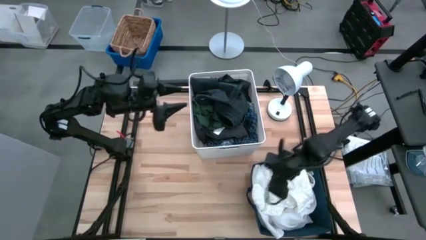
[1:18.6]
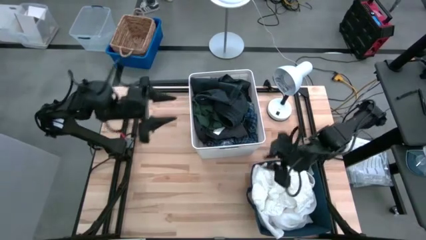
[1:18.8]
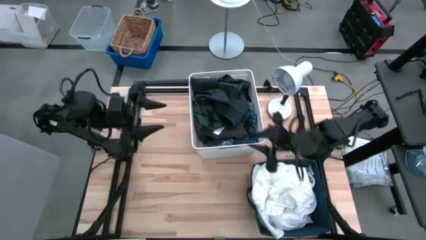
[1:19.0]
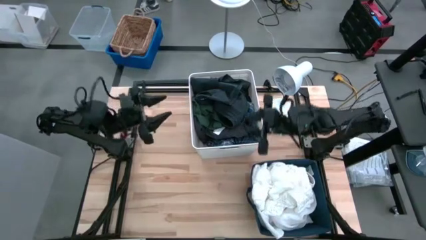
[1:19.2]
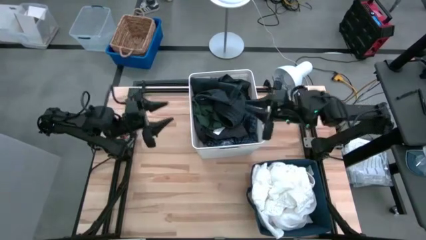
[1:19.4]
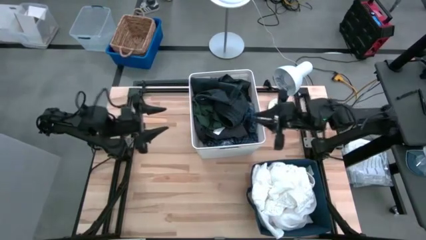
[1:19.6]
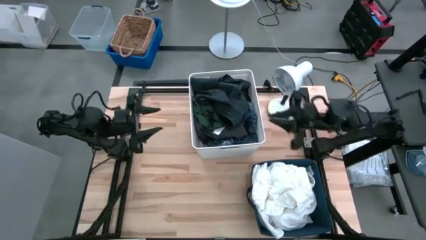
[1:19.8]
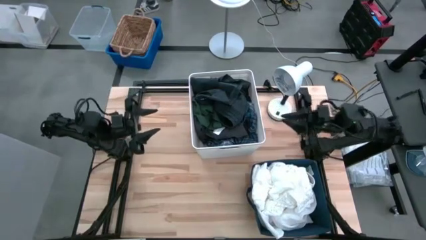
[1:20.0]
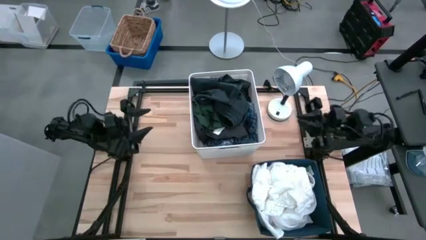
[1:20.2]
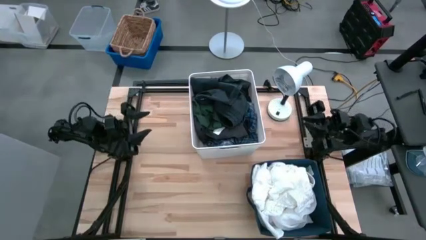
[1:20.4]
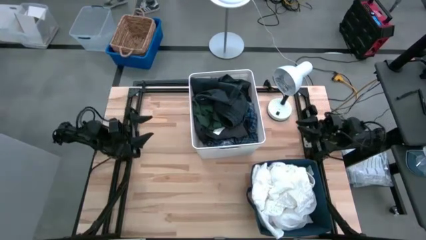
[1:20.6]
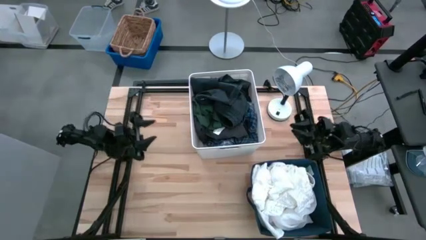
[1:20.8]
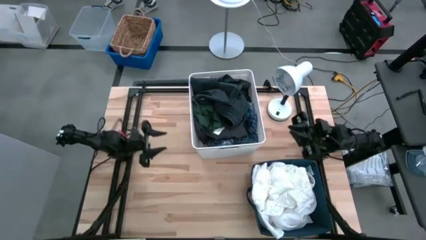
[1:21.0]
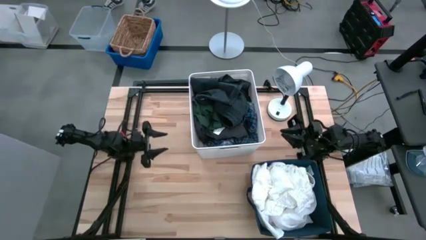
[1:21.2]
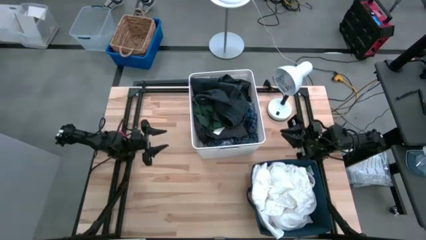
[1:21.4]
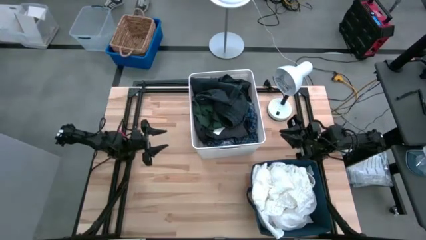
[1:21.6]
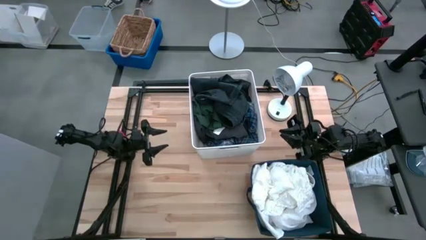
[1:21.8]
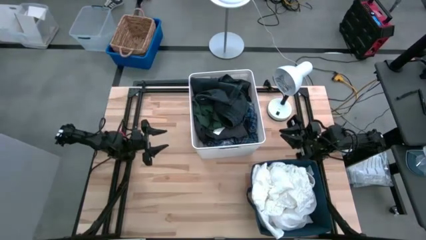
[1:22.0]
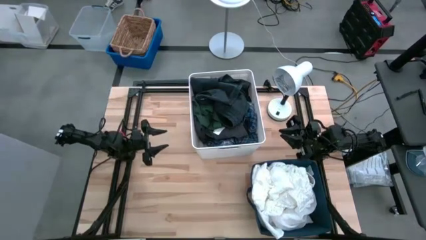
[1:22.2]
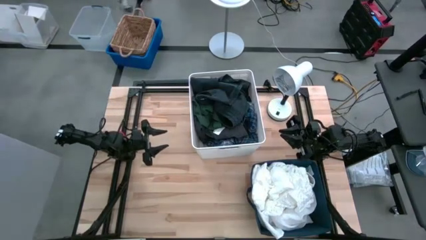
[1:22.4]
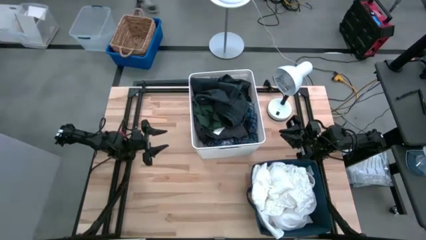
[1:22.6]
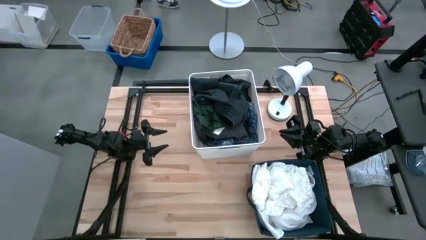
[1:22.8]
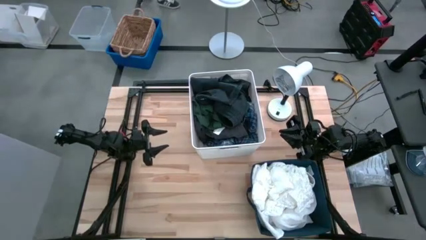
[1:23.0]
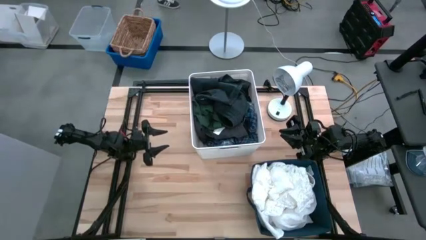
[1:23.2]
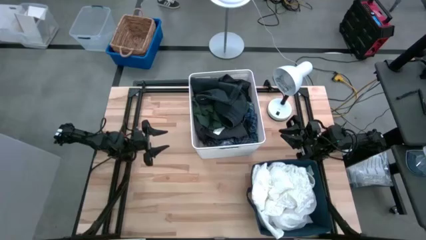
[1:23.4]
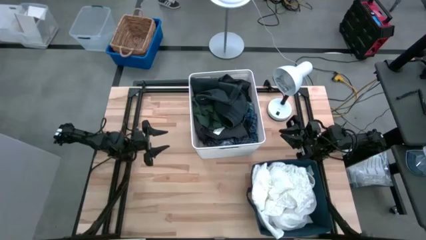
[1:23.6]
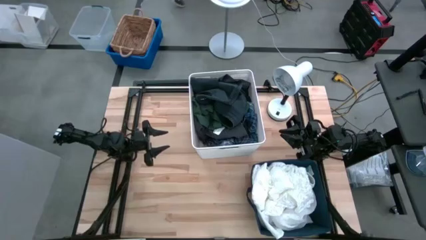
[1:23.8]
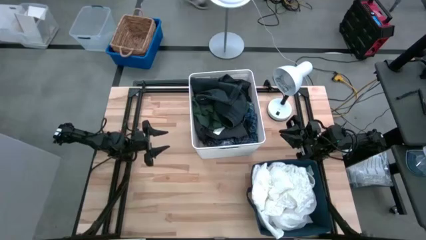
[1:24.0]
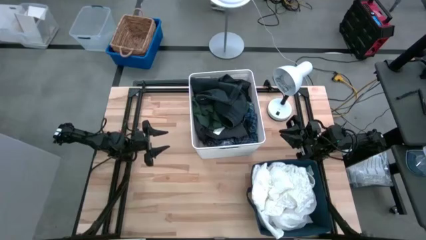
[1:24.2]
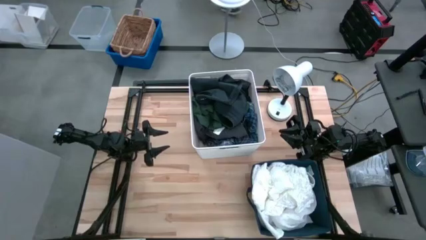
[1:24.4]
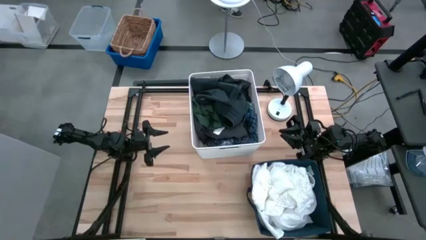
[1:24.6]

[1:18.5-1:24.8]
Task: Sort clothes
Return to Home Position

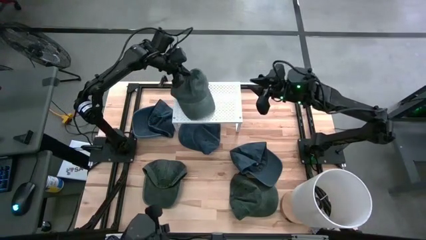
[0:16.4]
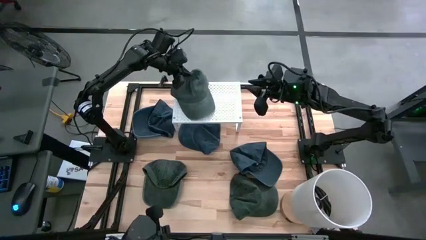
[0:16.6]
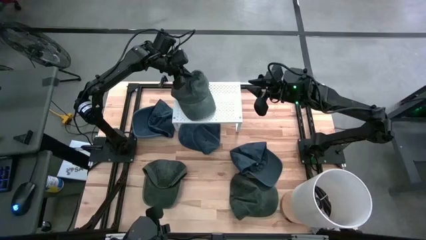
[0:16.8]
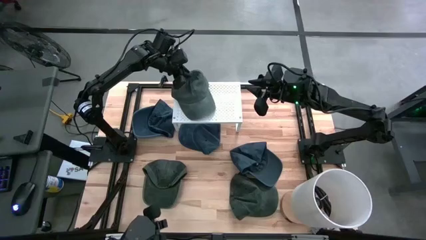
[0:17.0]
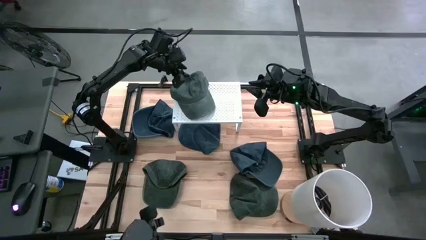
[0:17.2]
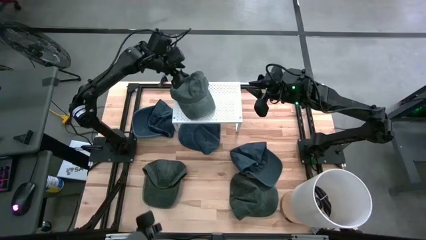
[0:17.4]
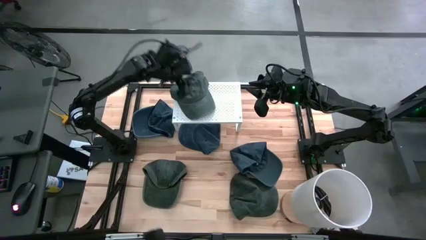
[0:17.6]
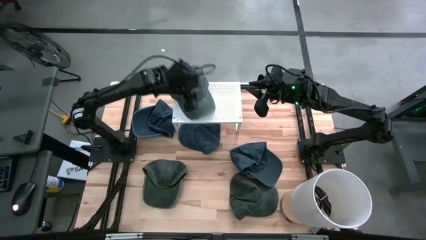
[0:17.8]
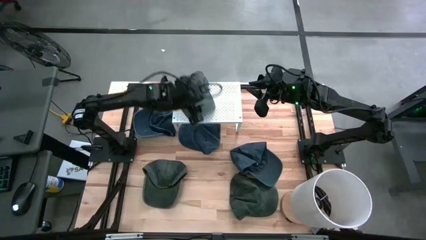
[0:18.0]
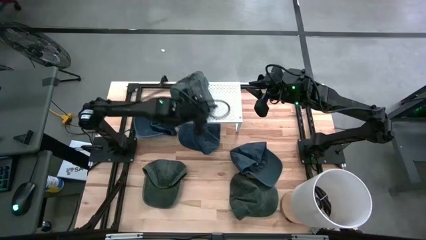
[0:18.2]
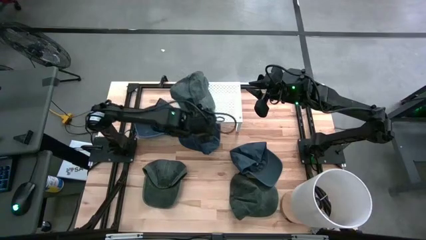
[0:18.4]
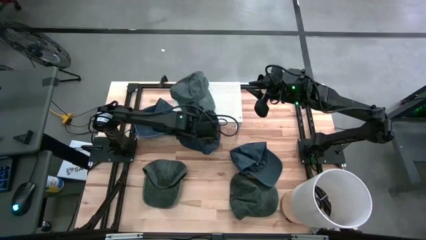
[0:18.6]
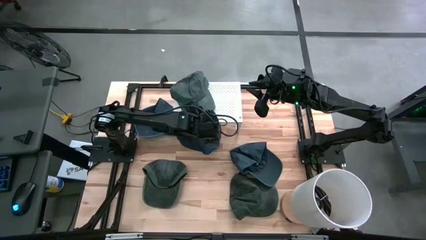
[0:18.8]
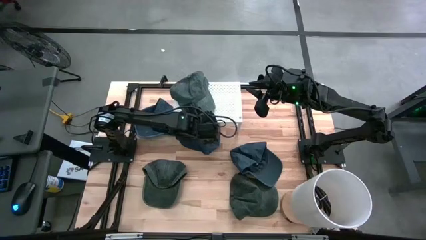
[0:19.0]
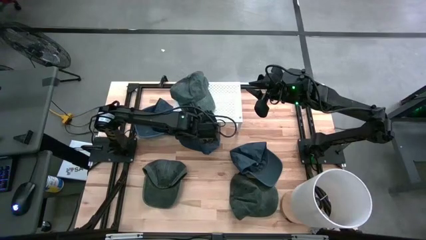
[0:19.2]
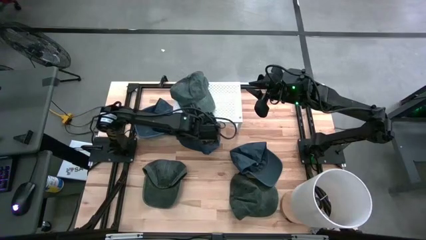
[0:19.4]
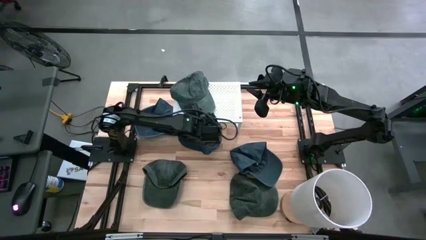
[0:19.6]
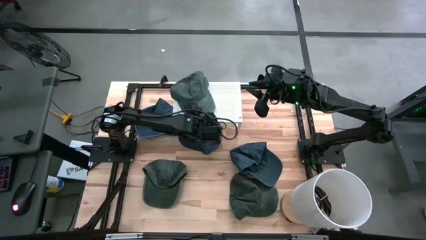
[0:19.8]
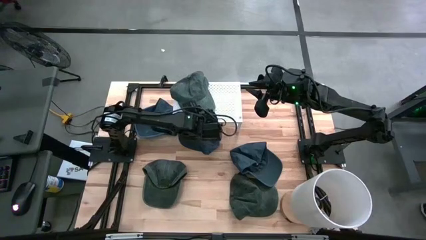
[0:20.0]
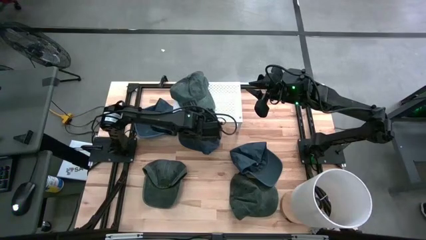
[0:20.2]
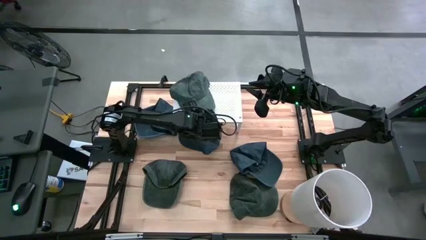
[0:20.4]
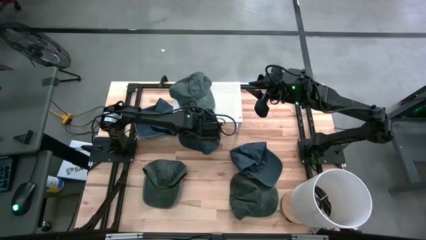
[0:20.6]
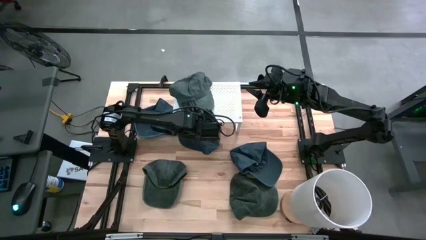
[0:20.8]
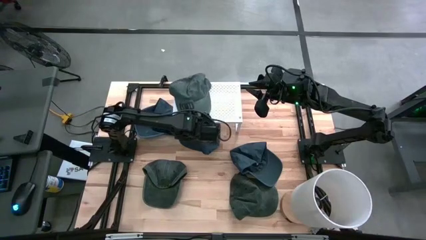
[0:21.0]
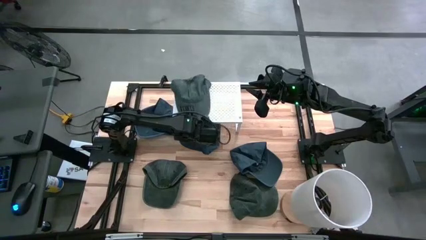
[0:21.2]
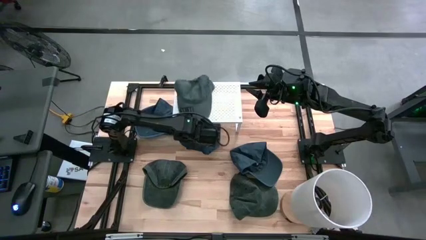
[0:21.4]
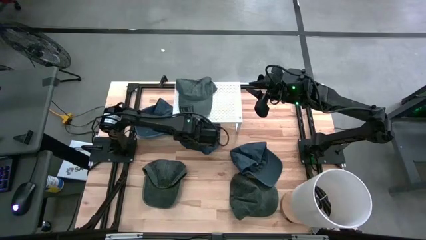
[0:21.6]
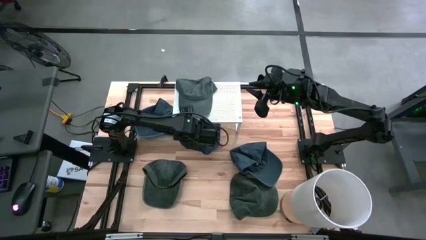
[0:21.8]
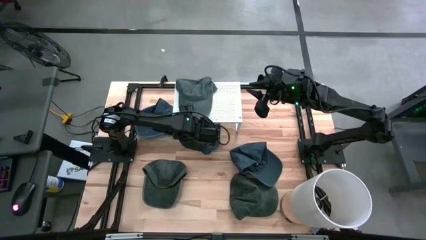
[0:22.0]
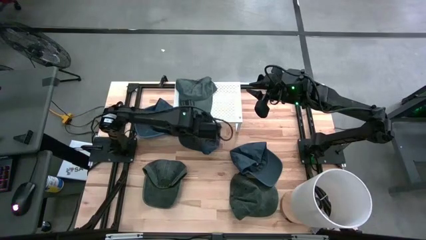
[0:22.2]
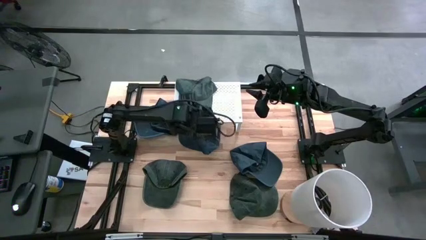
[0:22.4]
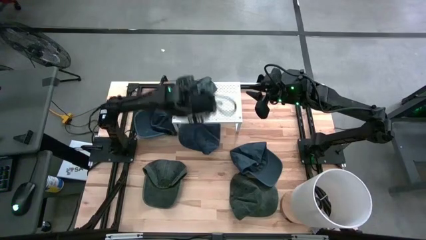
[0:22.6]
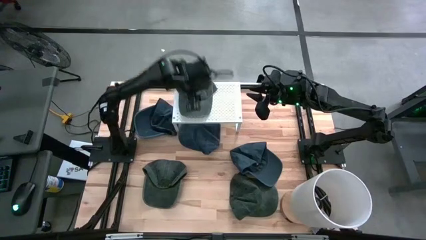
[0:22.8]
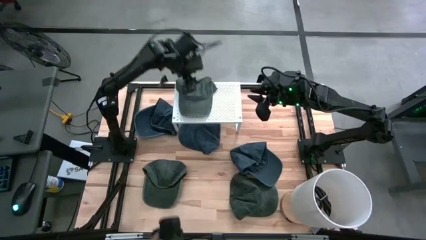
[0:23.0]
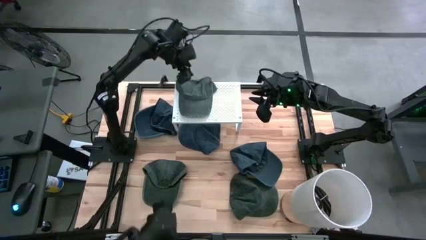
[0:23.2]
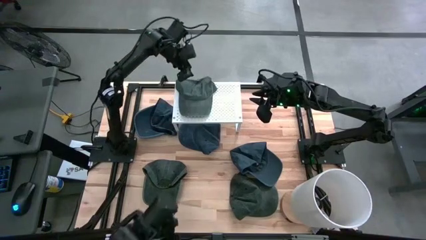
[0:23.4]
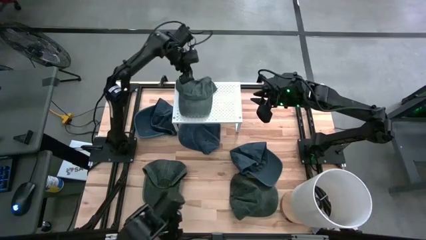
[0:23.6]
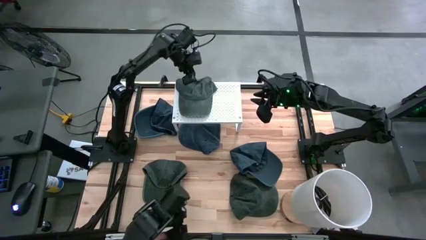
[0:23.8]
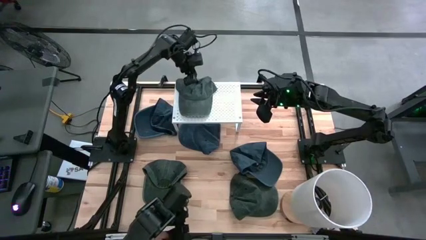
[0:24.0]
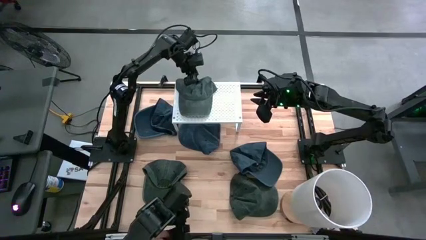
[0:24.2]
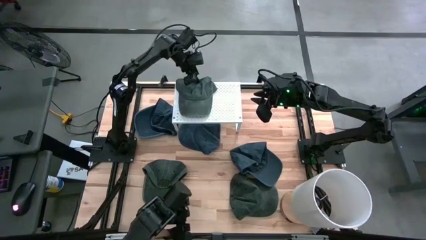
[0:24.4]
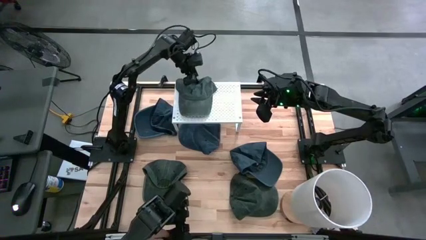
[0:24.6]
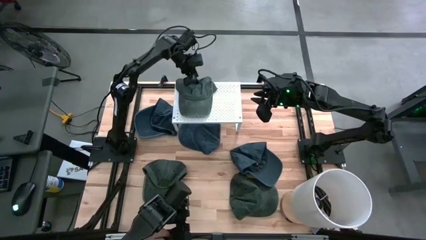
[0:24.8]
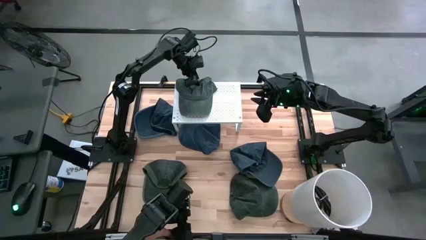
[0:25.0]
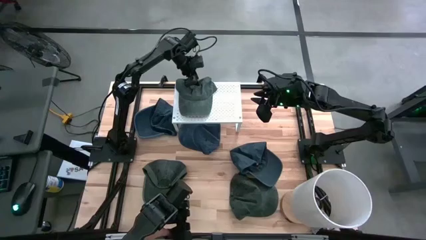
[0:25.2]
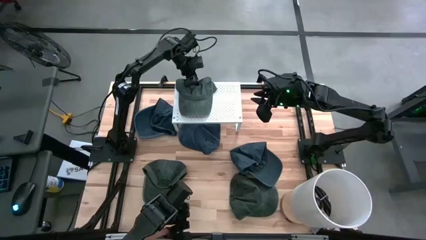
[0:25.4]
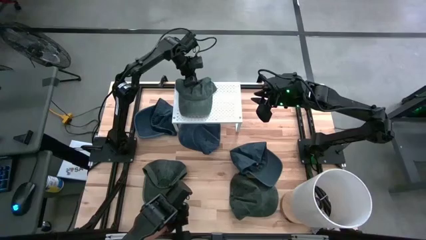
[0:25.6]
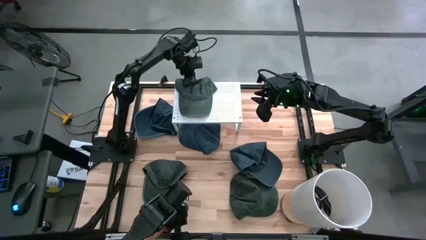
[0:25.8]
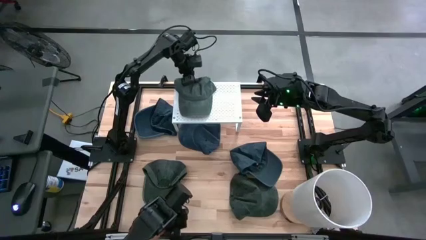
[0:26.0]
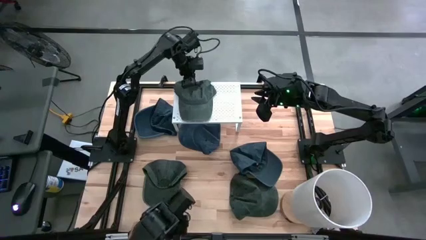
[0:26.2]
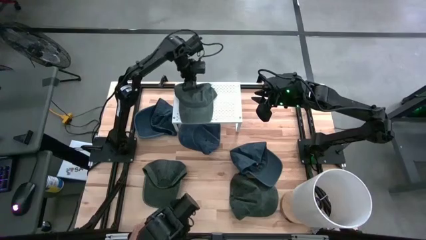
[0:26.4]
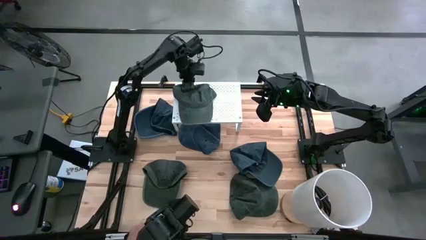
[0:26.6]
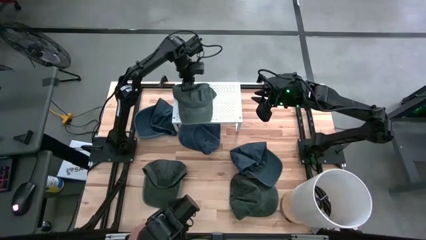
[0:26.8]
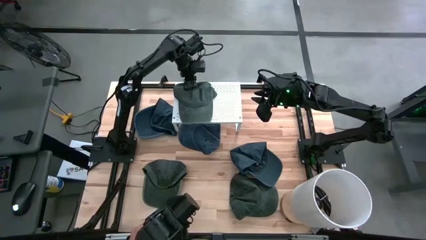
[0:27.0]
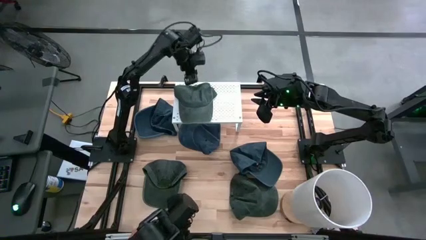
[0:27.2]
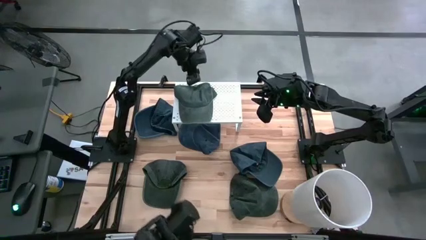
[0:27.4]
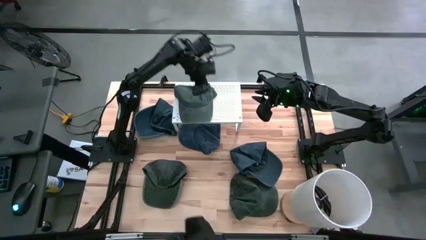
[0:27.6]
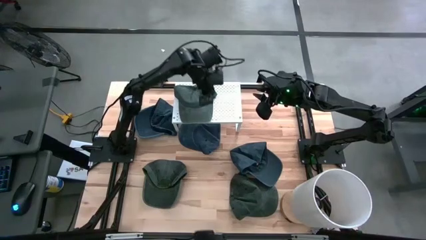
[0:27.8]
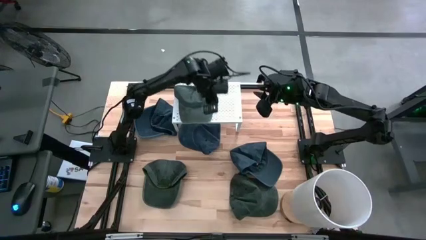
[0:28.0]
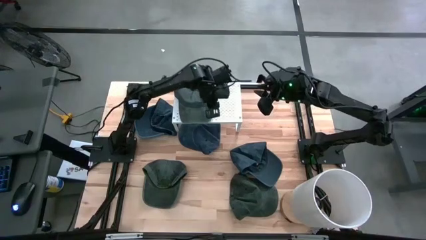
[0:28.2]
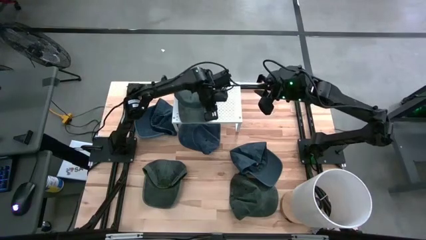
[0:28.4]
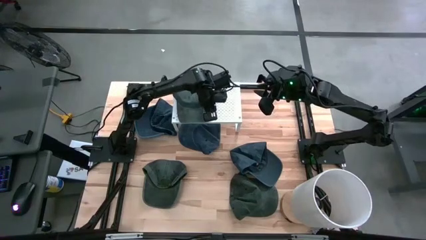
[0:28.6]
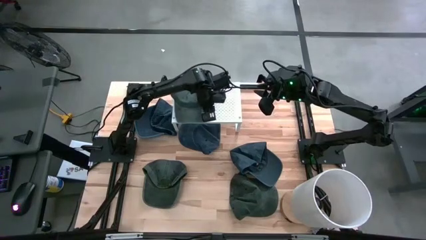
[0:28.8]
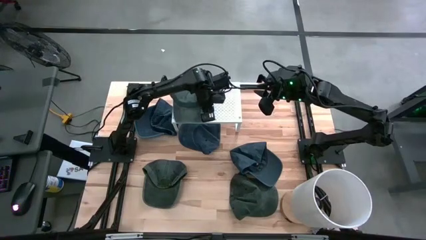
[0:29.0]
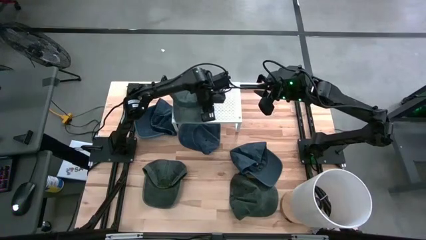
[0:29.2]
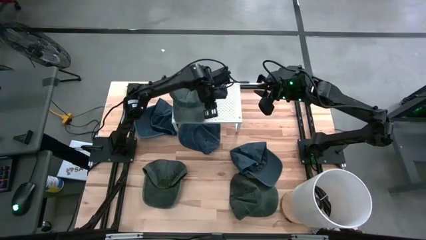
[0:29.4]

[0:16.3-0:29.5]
Task: Pick & Place hat
Put the top right gray cap on the shelf
